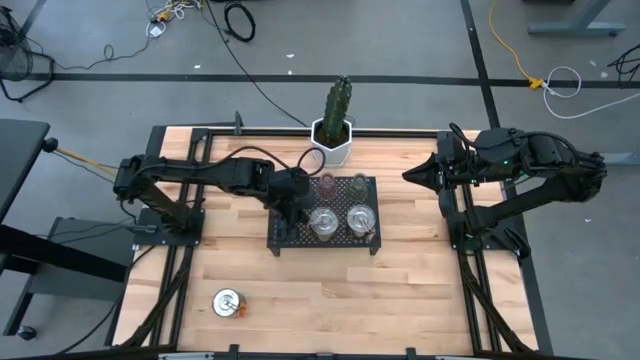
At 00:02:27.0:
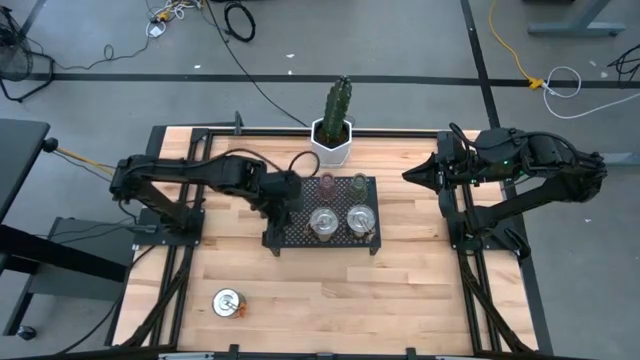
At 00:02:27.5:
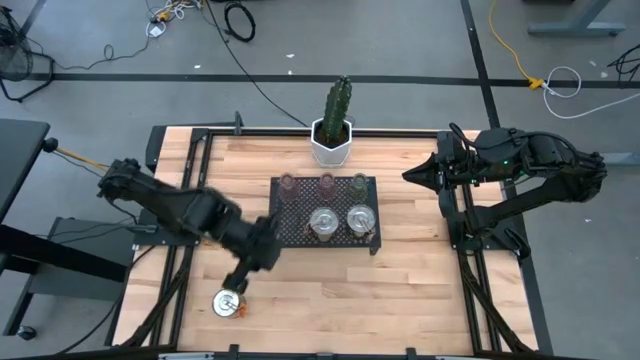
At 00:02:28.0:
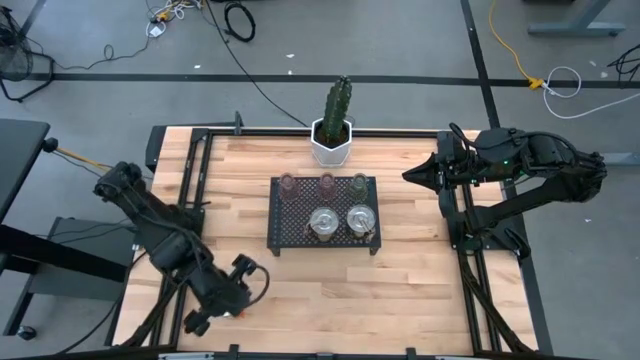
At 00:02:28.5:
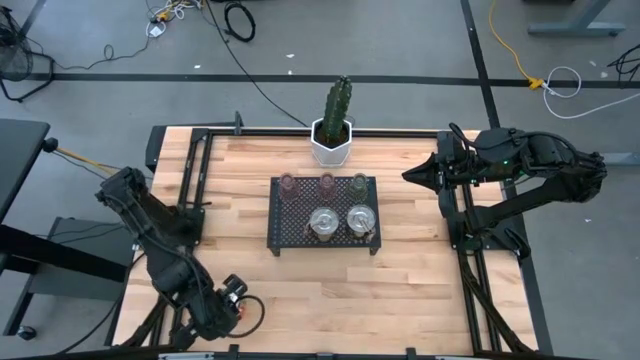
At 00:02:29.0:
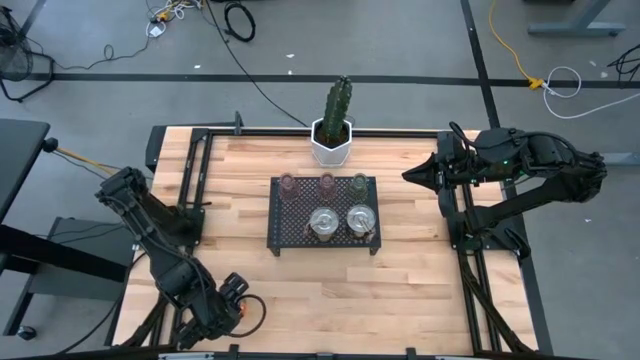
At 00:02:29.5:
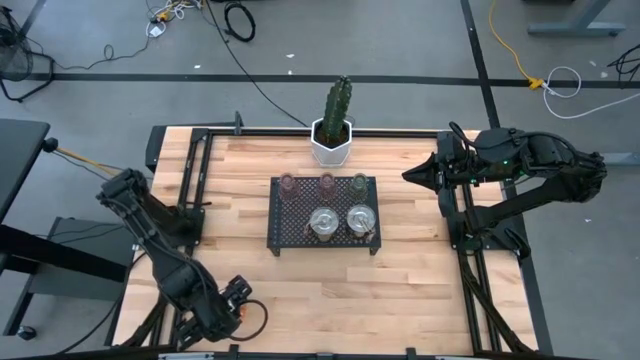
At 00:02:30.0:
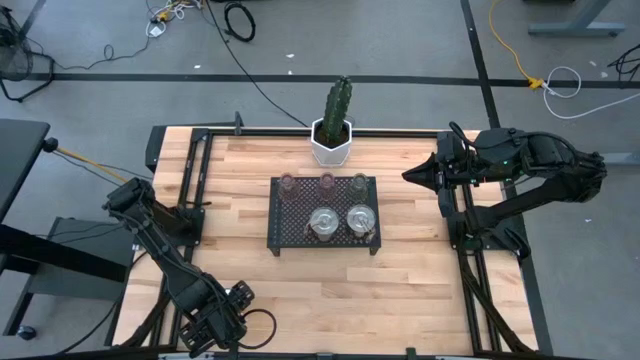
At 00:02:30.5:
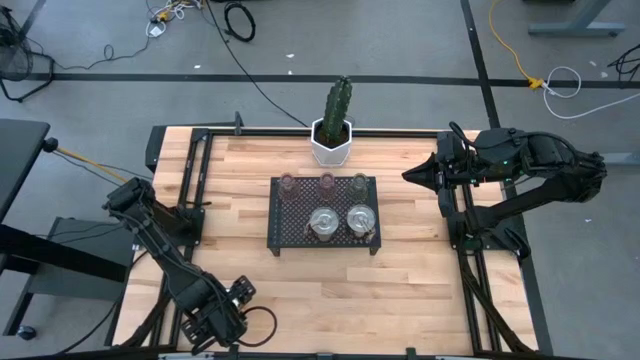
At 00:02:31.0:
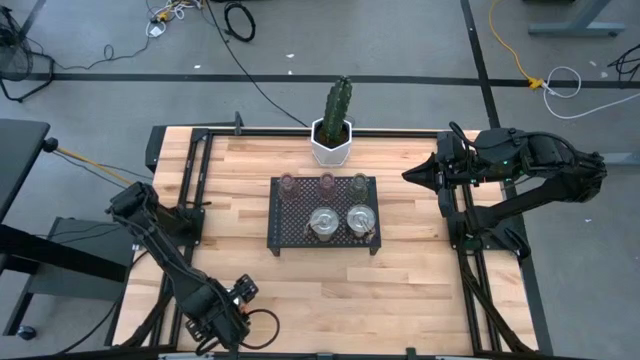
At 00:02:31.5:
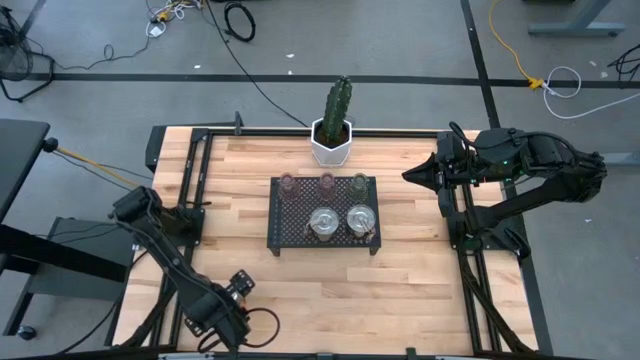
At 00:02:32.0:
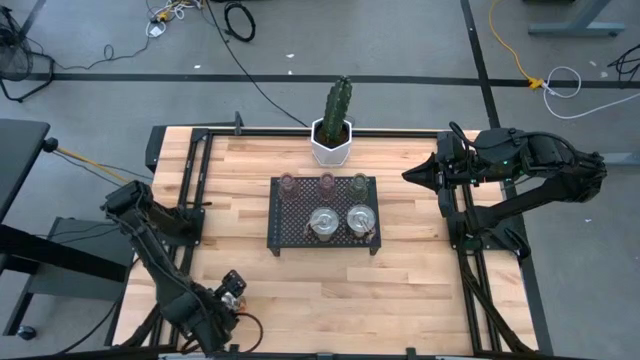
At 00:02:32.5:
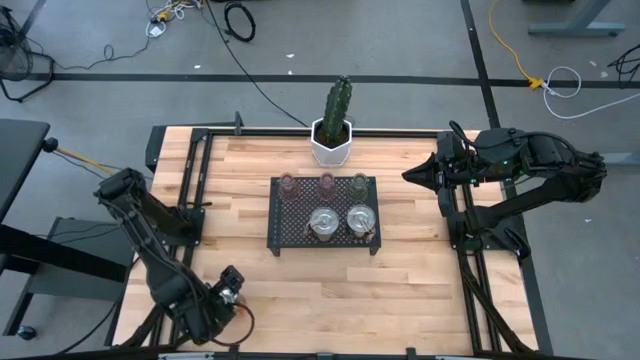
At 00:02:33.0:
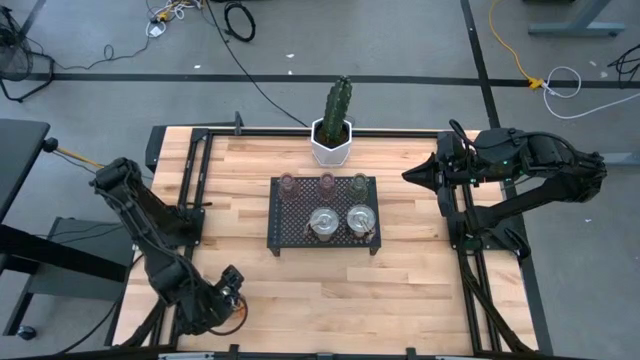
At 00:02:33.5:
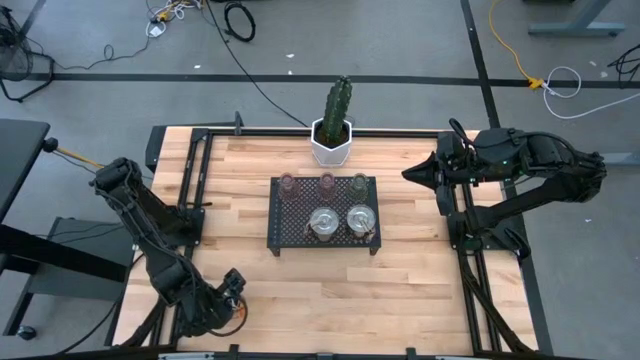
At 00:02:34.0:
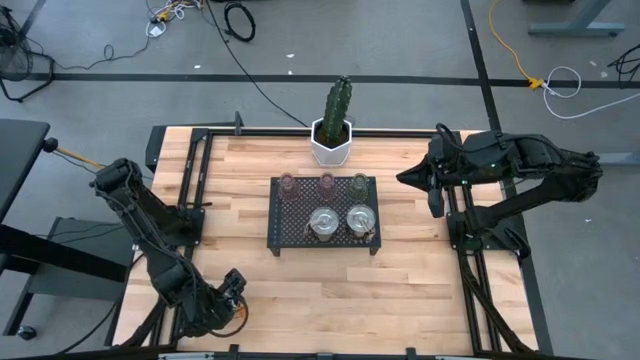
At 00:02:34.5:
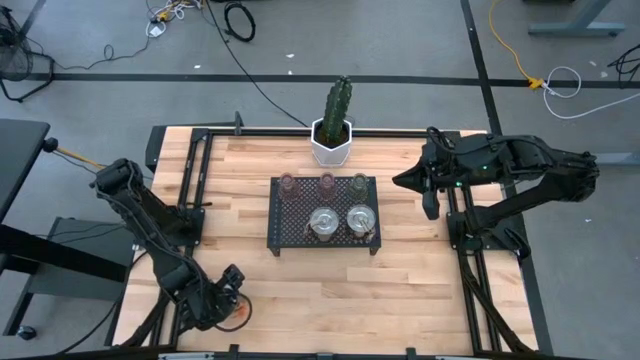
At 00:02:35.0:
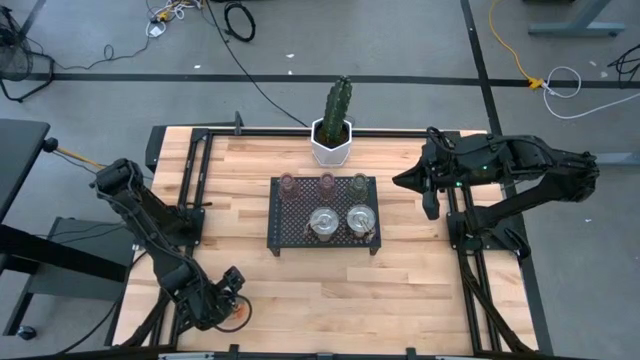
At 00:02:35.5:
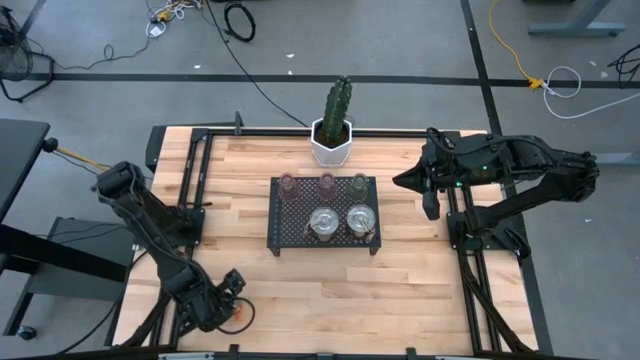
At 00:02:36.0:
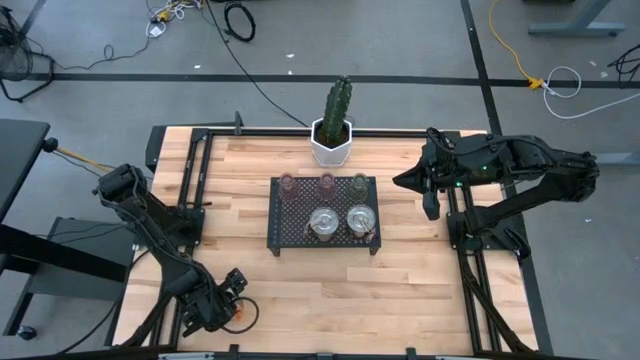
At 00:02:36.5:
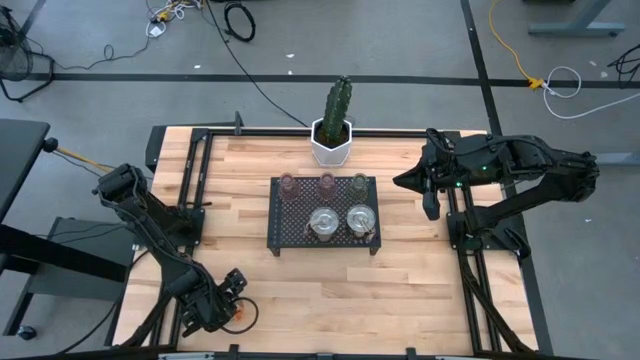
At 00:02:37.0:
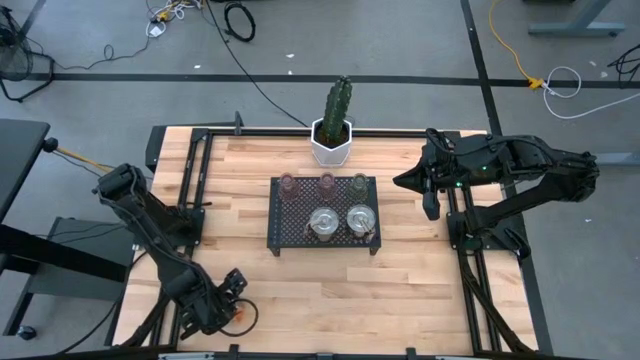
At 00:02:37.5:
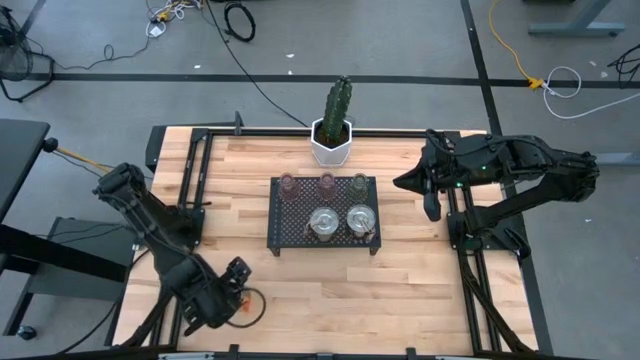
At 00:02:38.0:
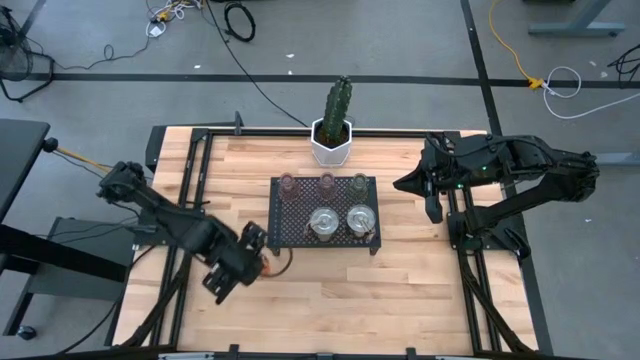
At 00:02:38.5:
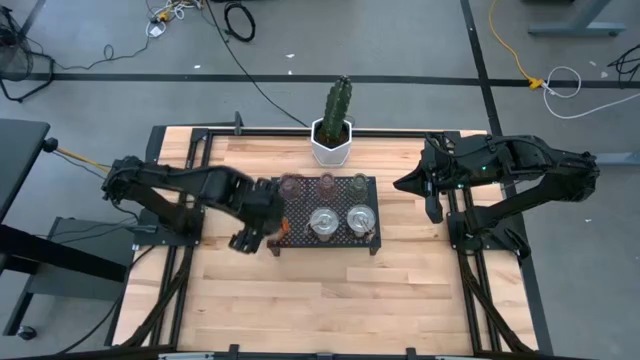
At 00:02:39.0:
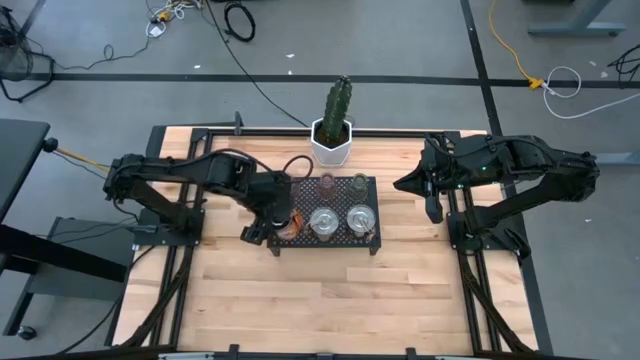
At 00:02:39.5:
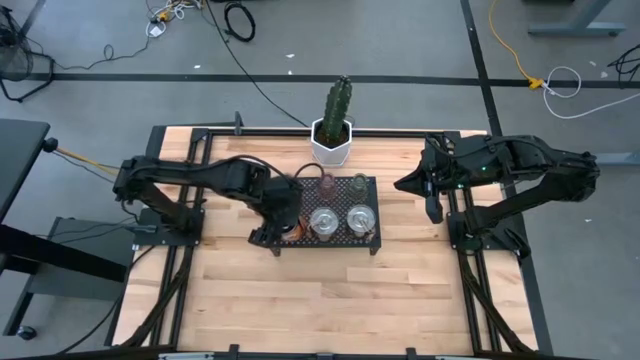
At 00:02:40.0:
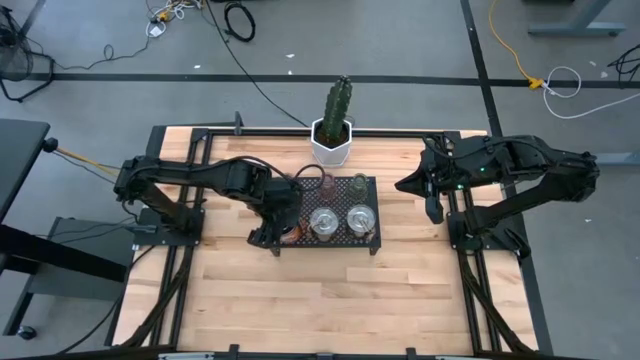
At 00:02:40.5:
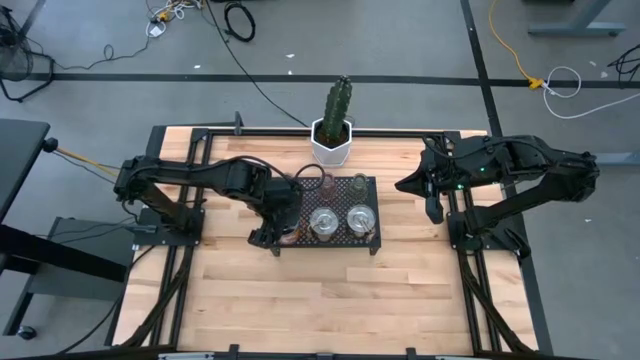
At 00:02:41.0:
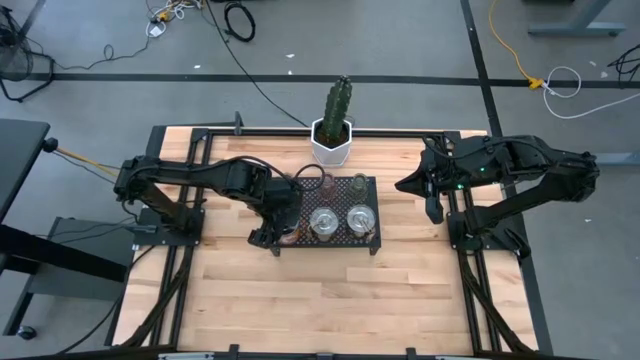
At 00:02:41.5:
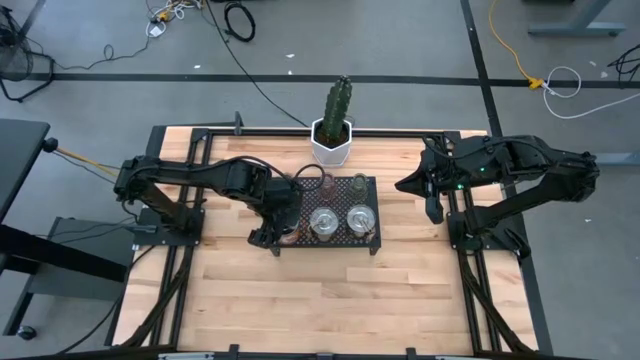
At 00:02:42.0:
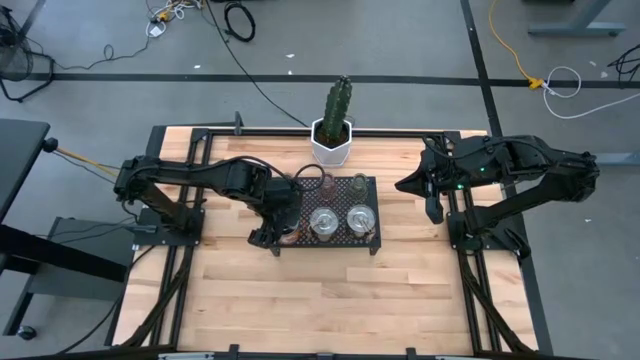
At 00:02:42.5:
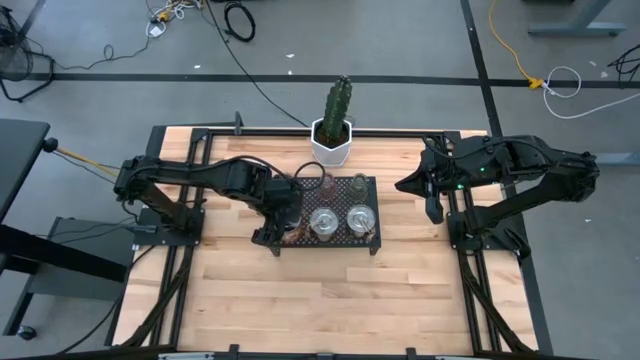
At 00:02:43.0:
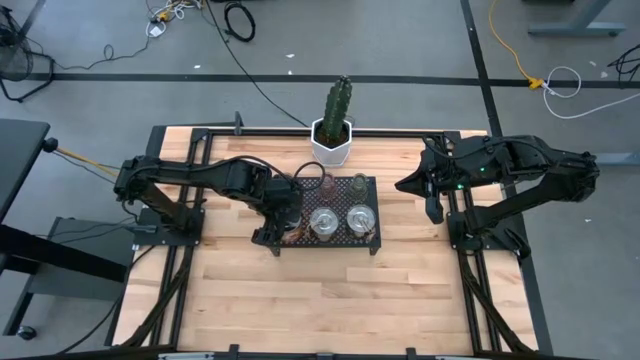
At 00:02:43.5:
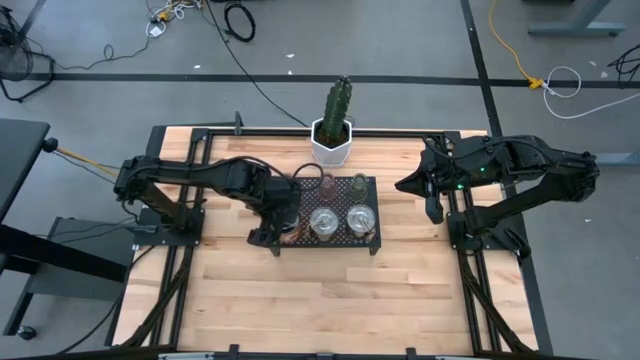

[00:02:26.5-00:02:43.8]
Task: Pick & Place candle stick holders
Put the silver scented candle on the shelf
